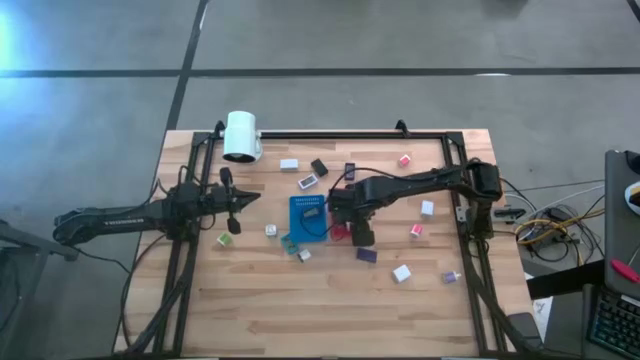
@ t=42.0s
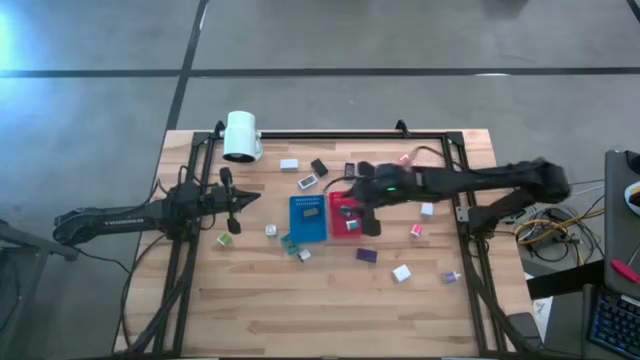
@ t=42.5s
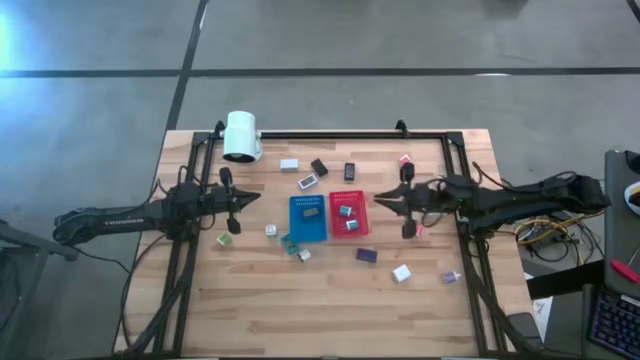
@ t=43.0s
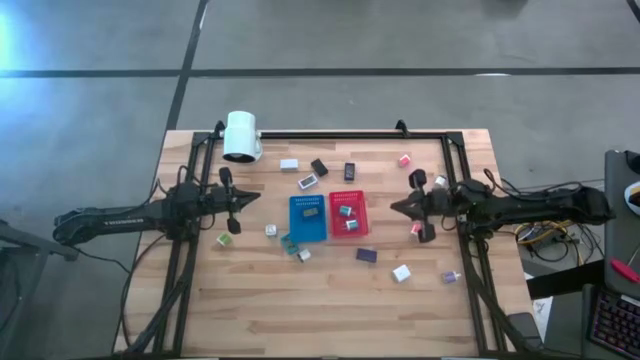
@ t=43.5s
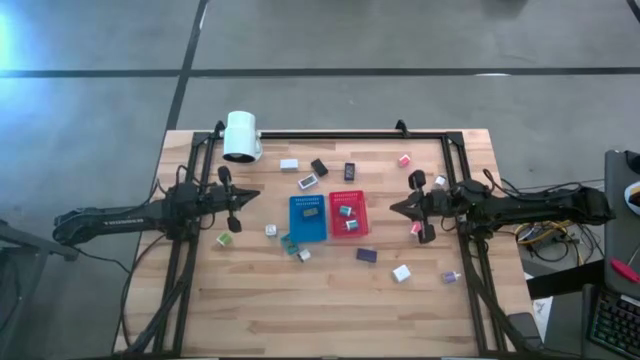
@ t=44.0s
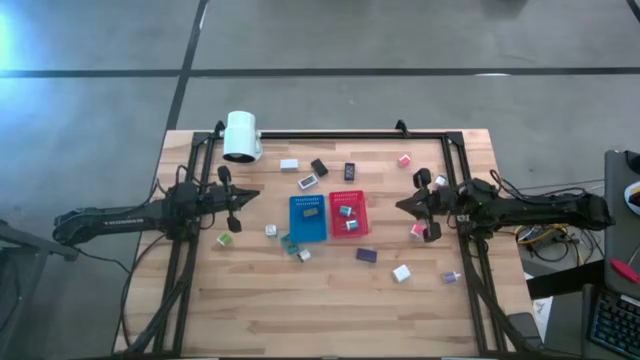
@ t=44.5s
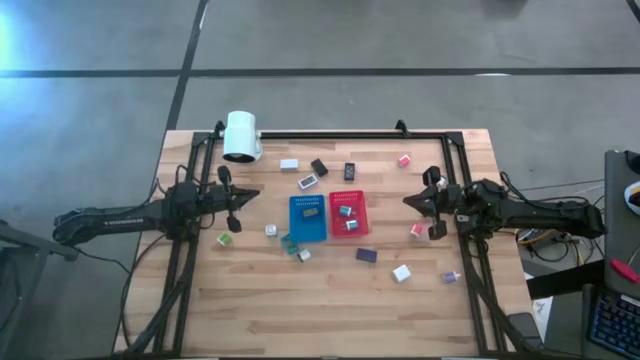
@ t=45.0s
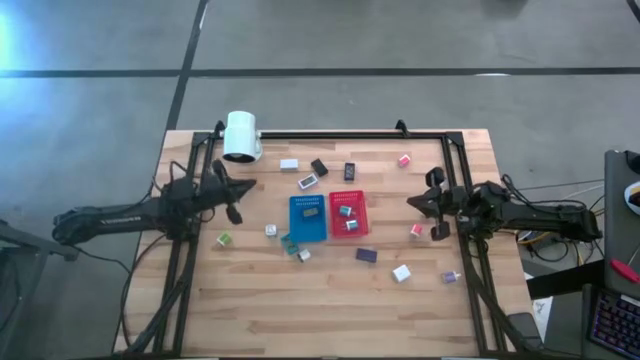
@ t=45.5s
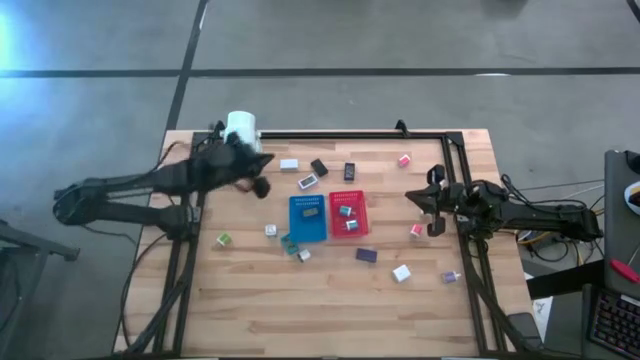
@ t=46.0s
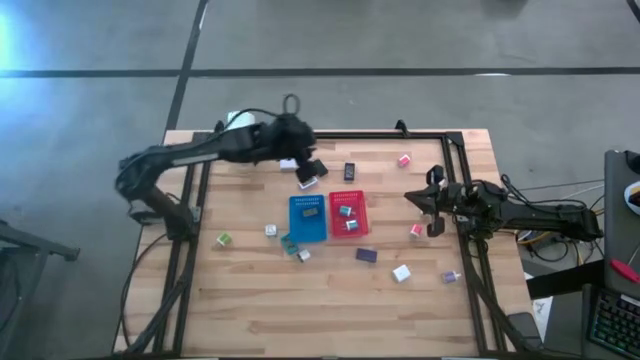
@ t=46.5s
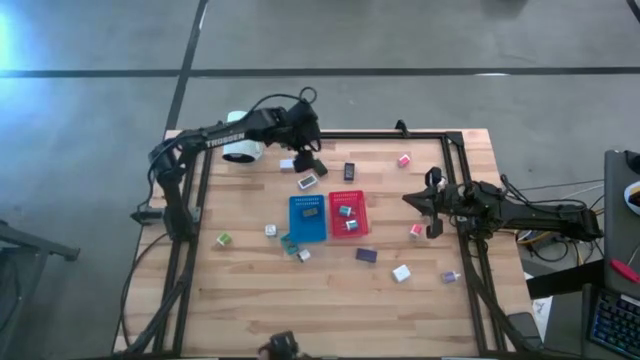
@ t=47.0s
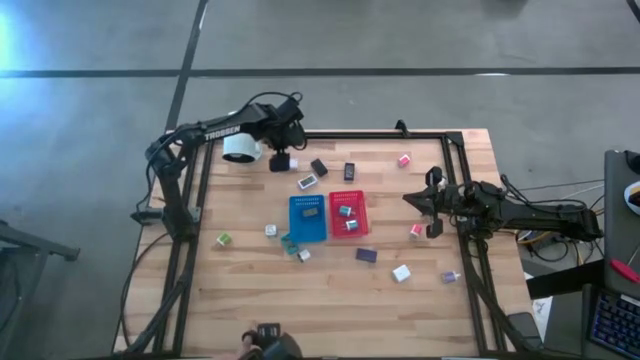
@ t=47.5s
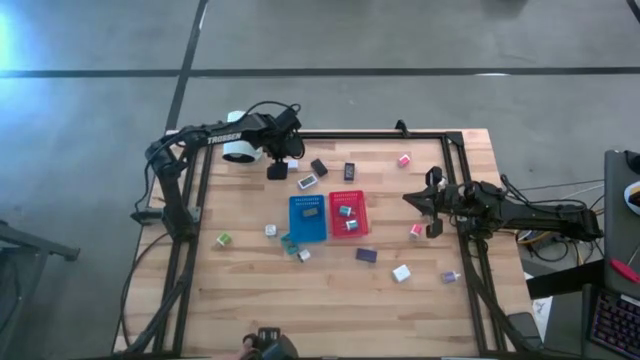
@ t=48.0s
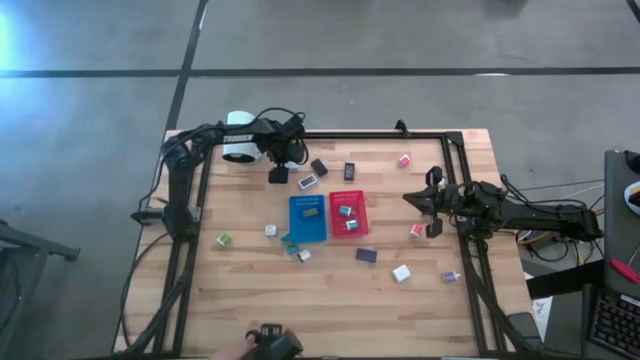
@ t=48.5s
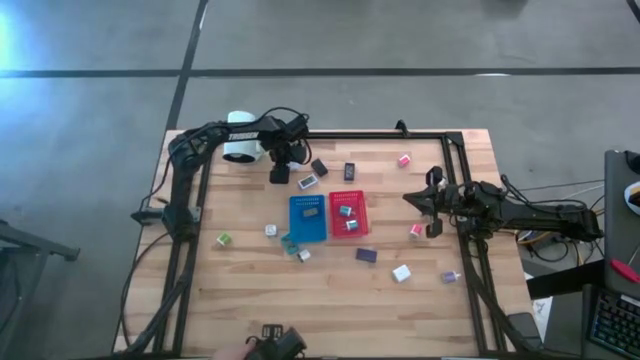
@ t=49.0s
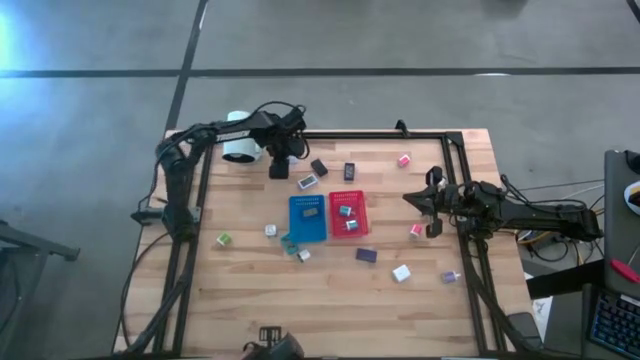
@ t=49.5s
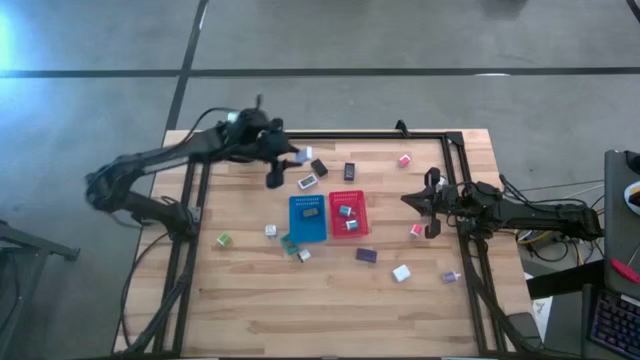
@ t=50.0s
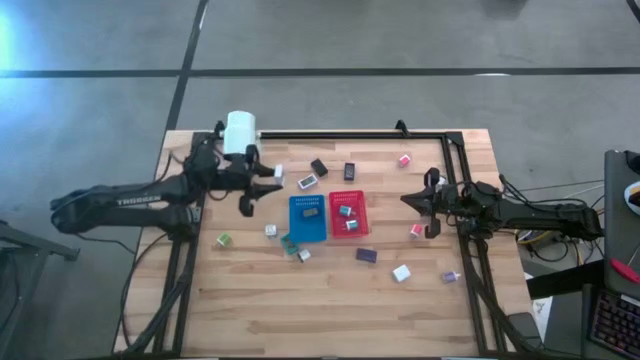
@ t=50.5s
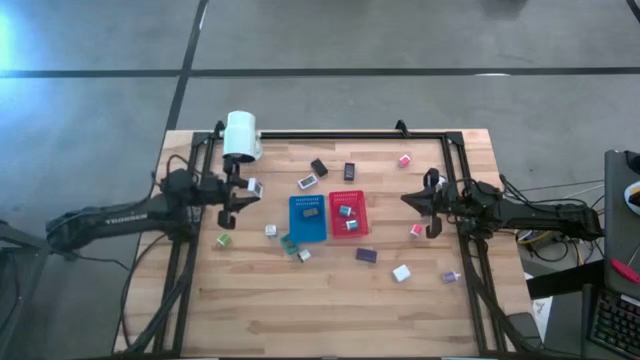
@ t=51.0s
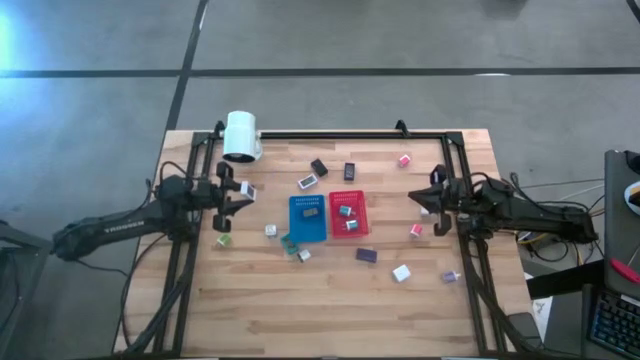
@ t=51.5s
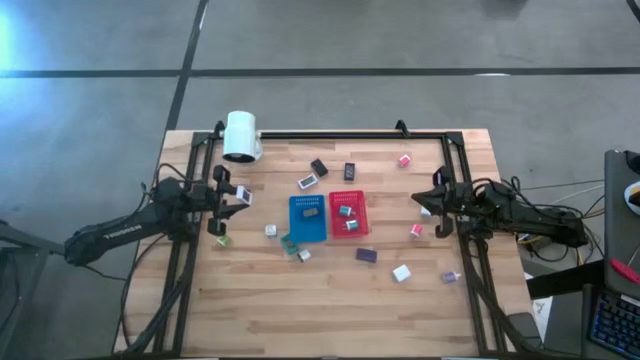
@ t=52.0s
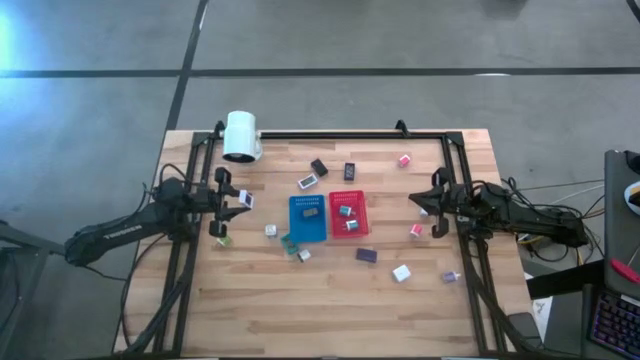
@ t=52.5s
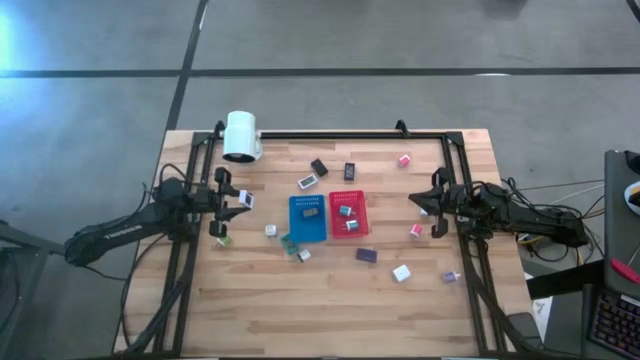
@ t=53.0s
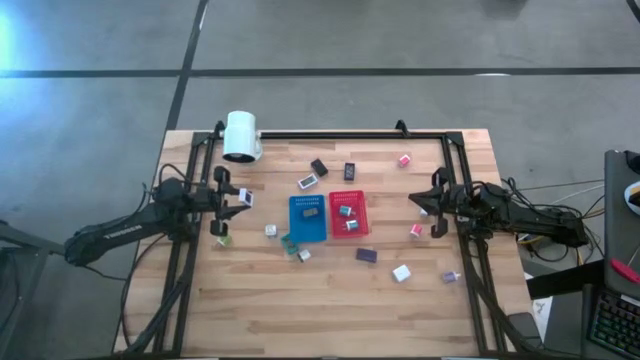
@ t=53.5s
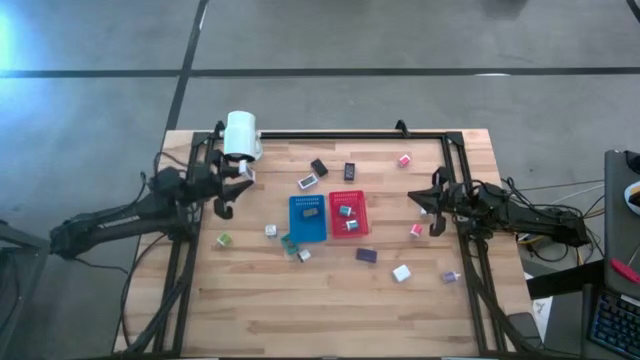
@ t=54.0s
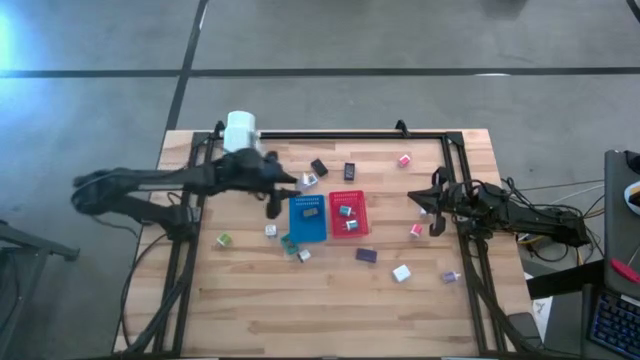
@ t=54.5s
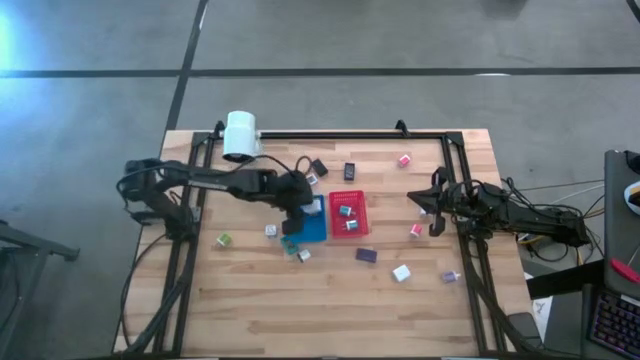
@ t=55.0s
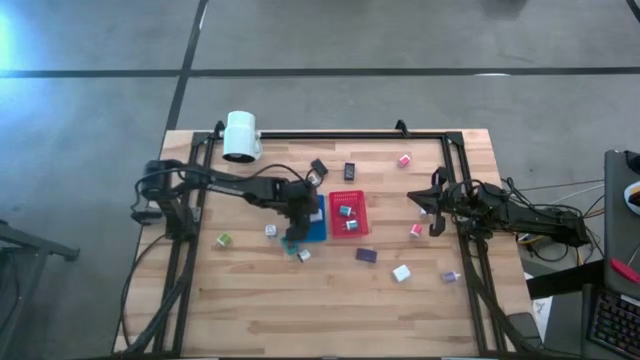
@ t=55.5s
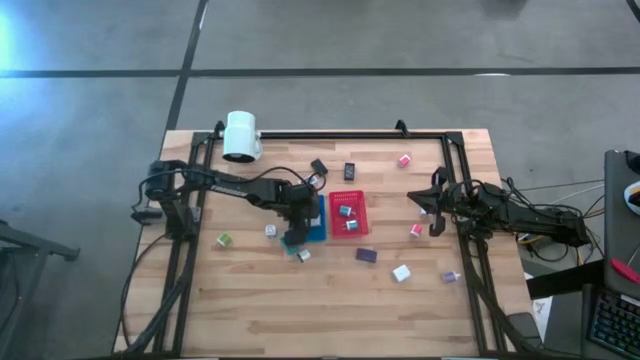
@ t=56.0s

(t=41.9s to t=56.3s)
Task: Pick & Place Office items
Put the top white digital clock into the blue bin

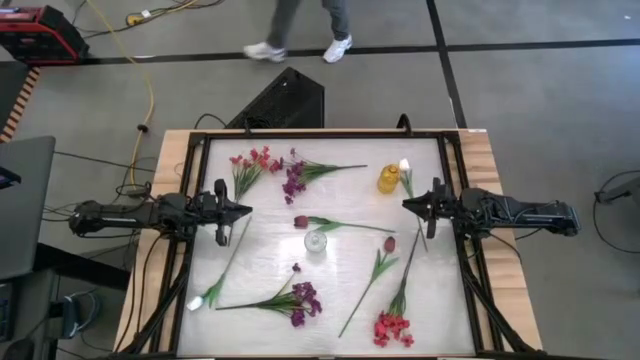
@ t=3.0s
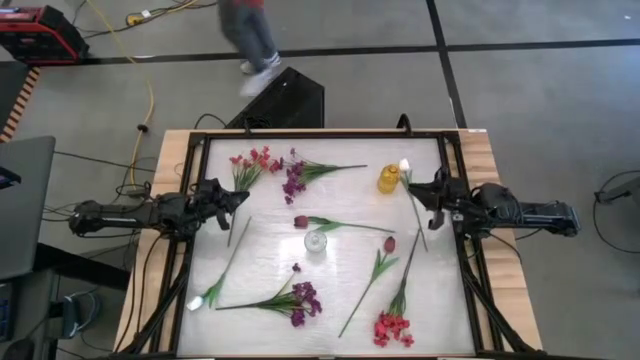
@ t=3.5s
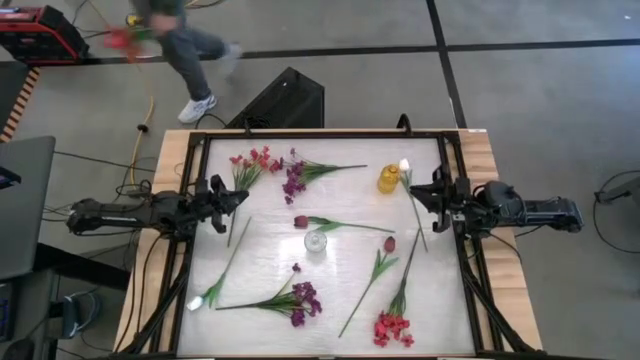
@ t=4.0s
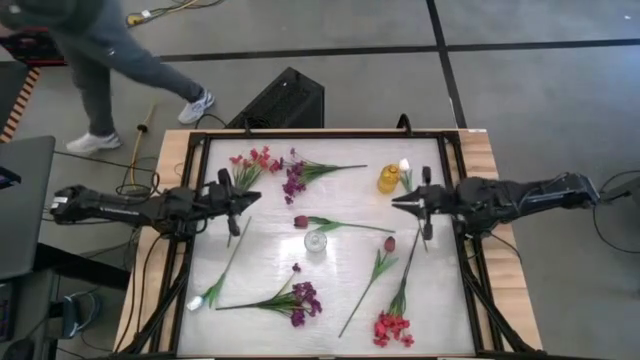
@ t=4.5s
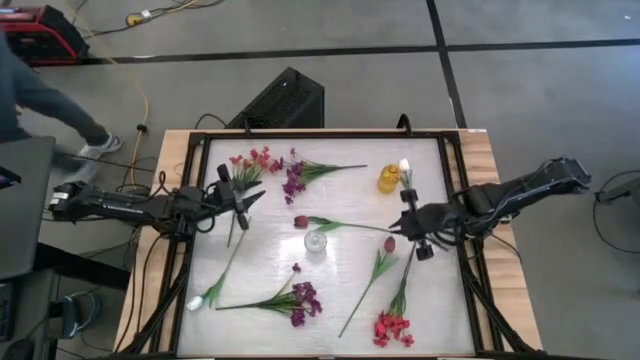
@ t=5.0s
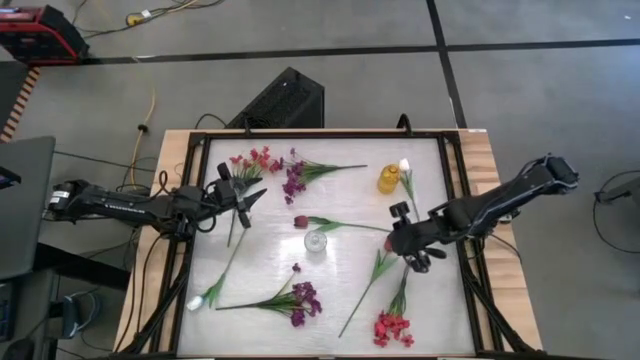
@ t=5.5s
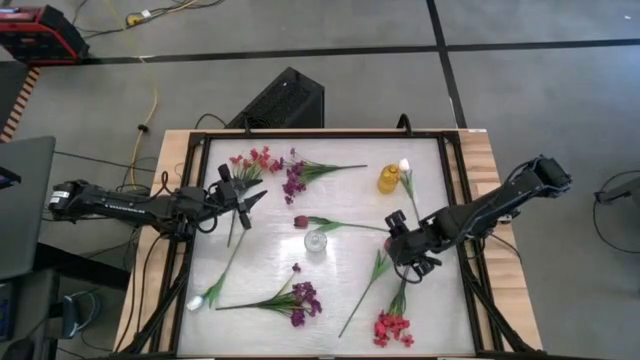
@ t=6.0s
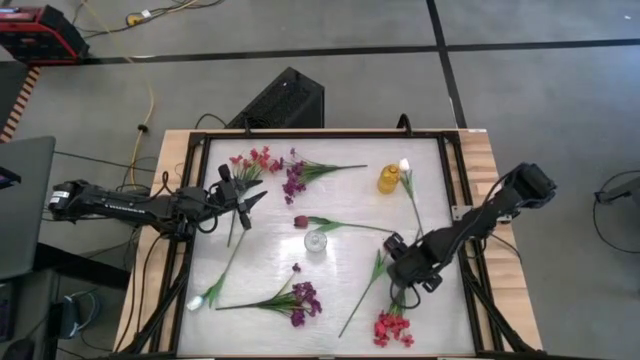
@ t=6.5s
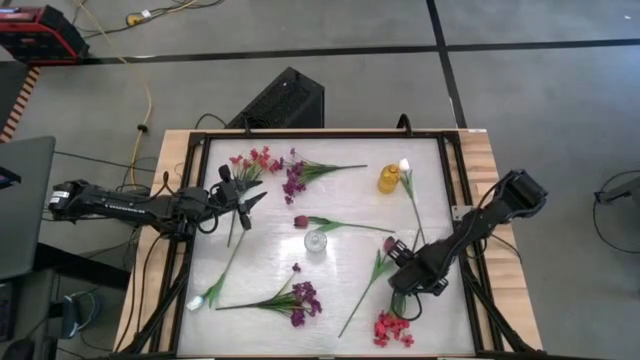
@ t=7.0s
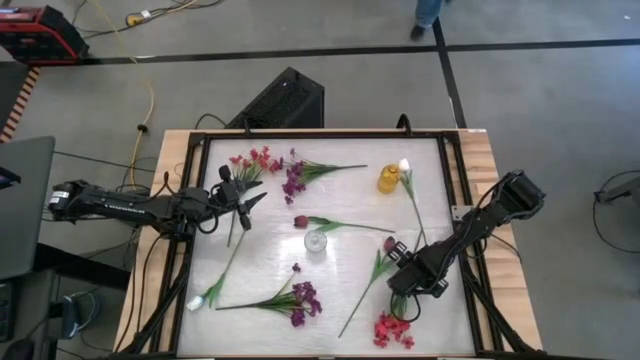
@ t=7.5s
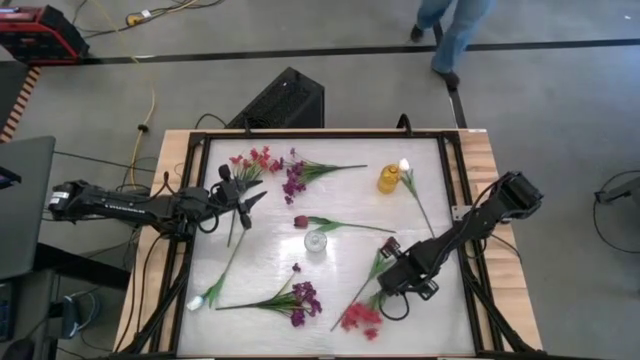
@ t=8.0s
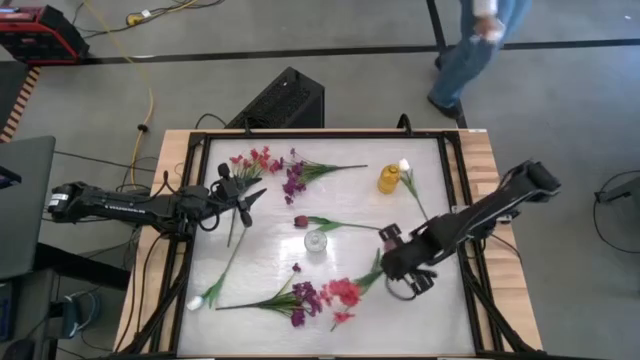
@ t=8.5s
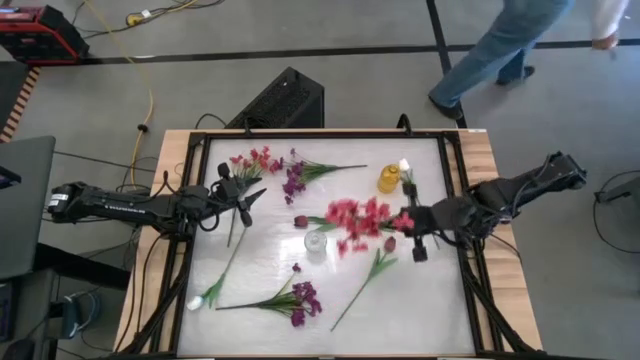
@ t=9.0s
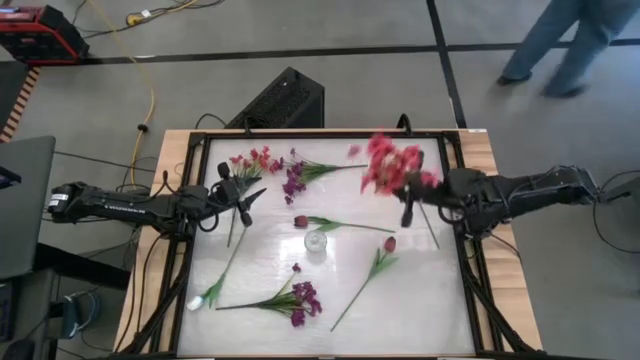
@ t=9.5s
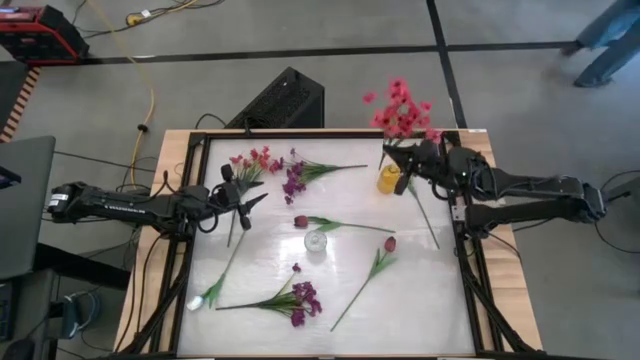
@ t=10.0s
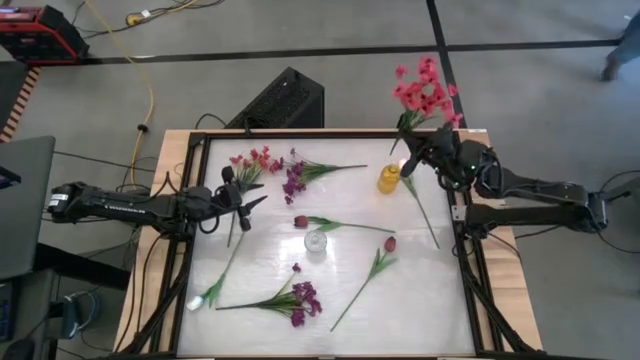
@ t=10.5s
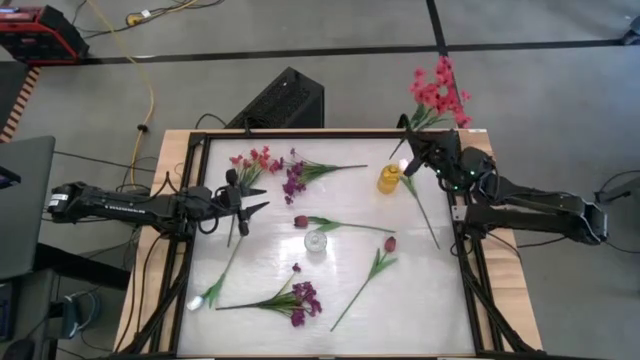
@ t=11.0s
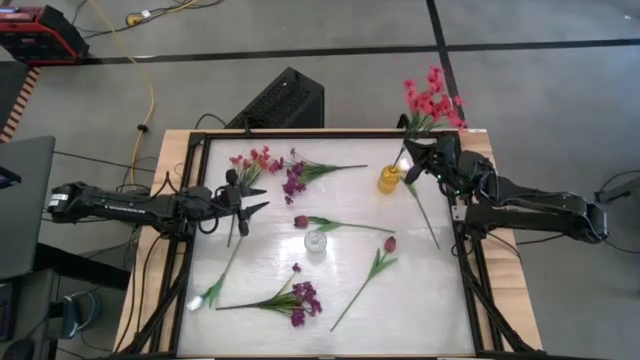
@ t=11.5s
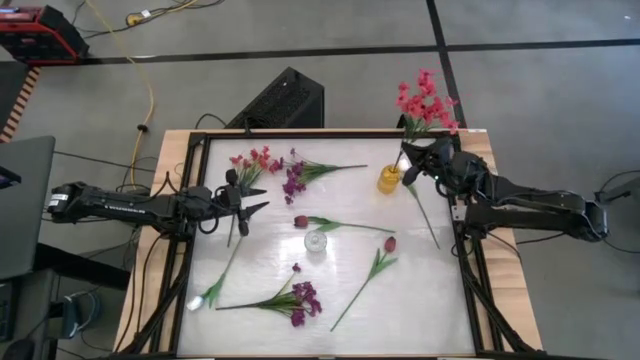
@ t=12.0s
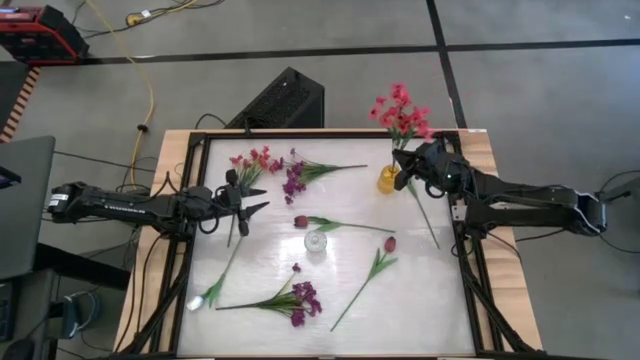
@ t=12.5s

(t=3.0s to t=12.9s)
Task: Sort flowers into vase by color
Put the bottom pink flowers into the transparent vase
